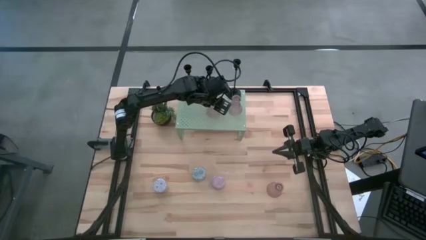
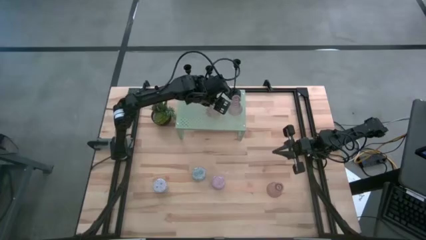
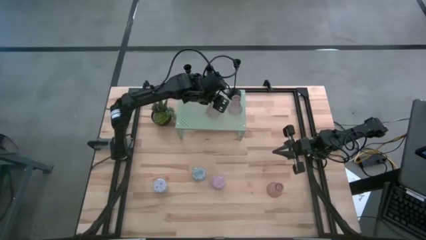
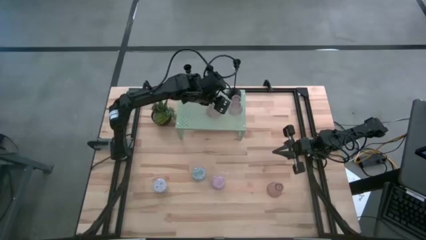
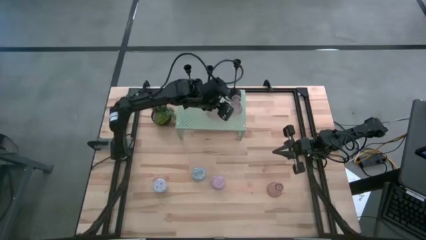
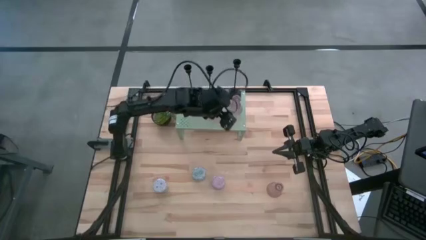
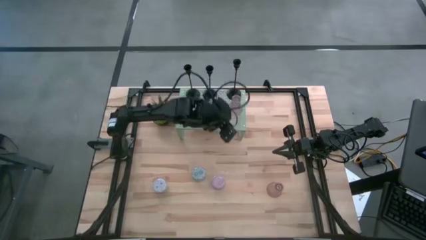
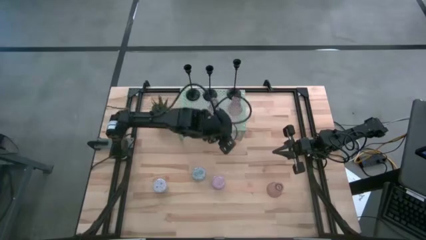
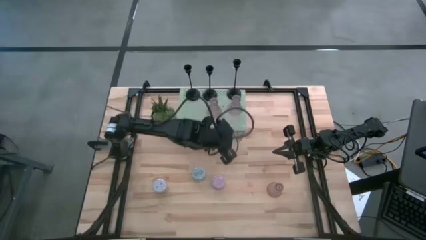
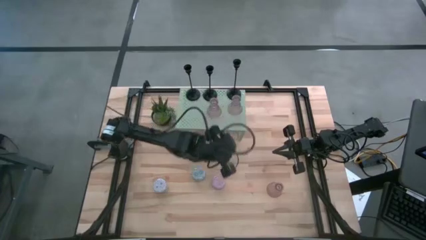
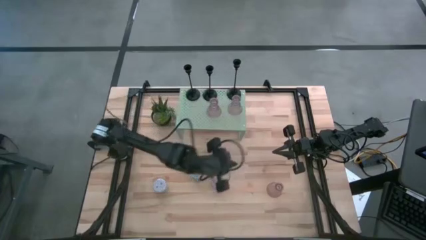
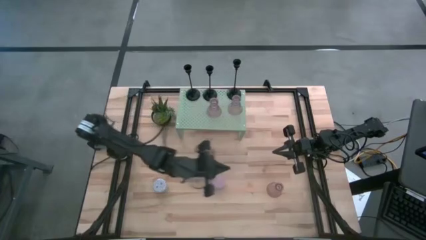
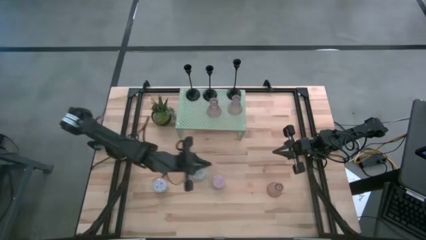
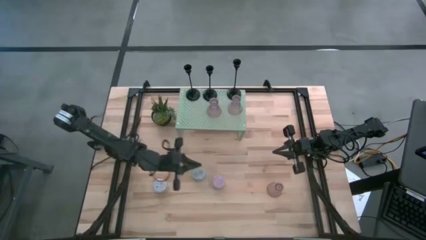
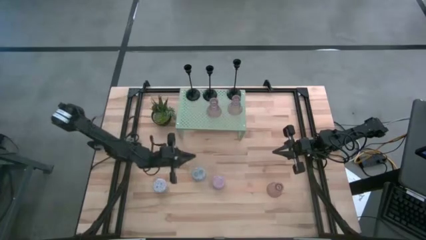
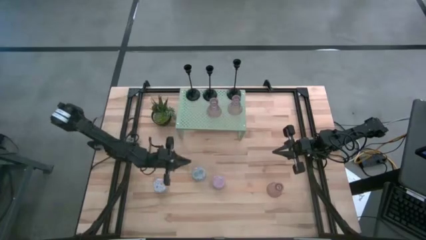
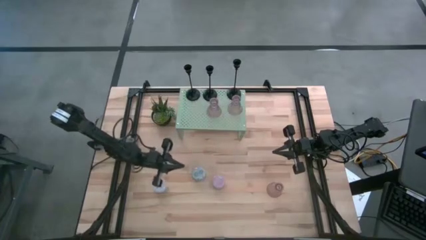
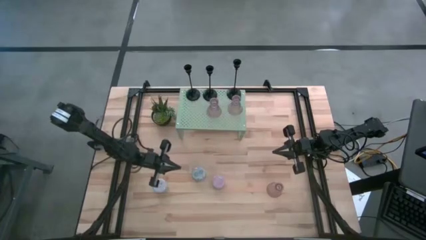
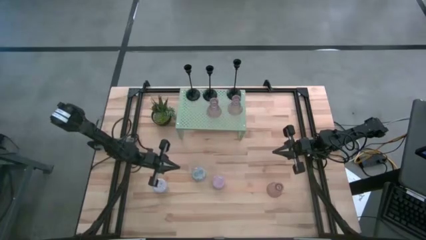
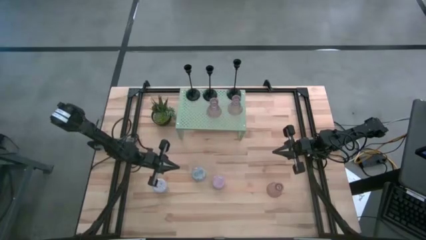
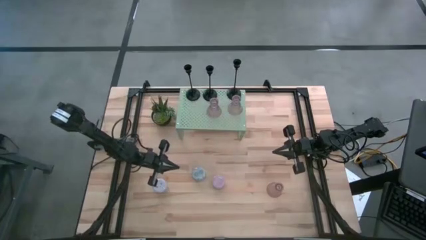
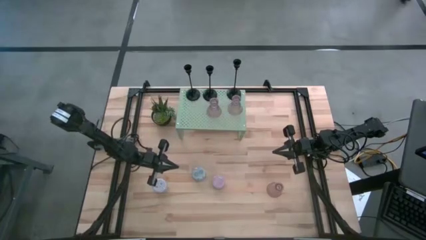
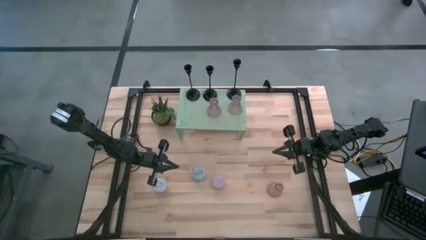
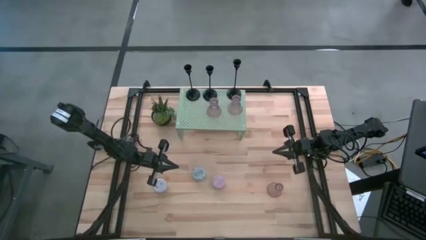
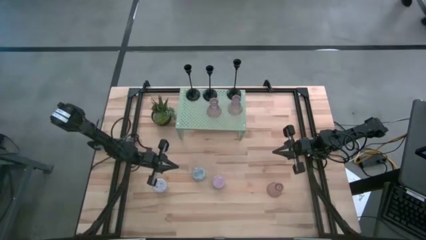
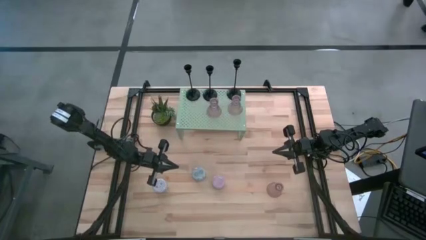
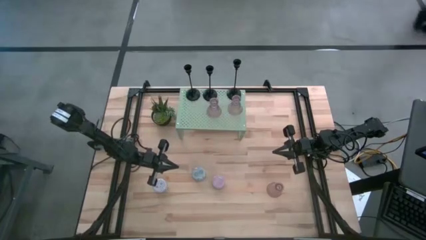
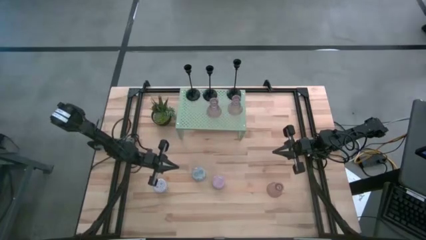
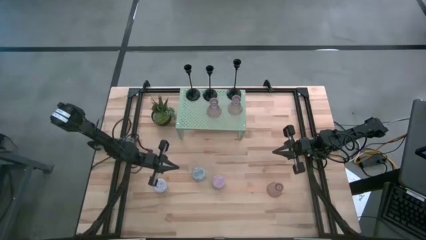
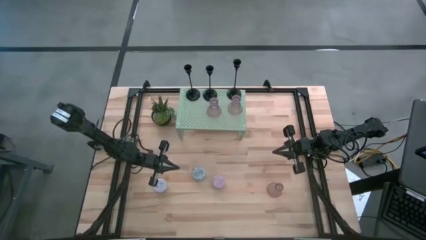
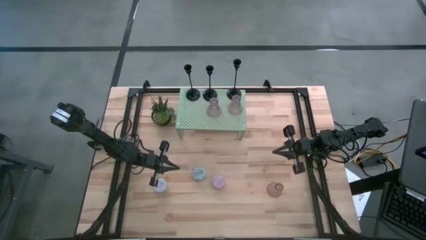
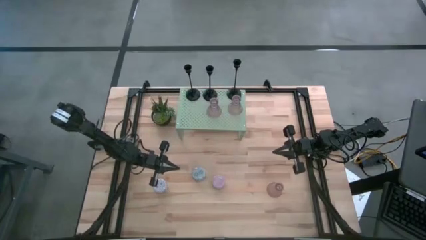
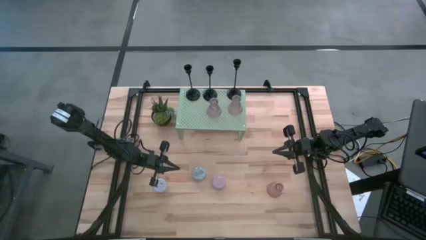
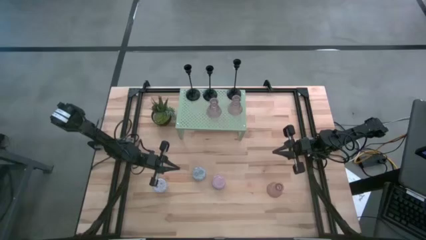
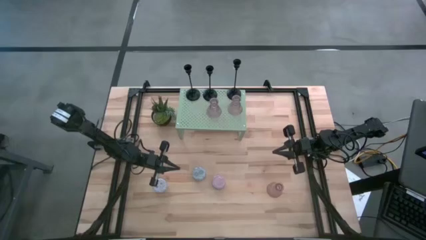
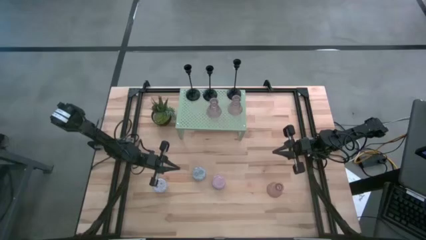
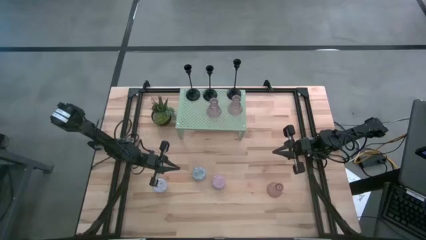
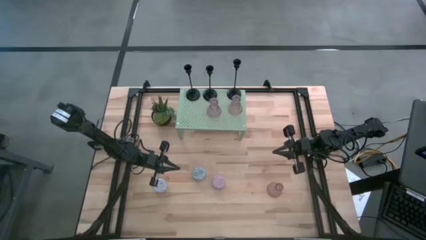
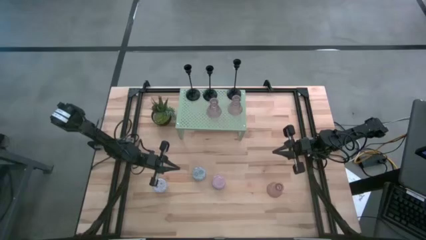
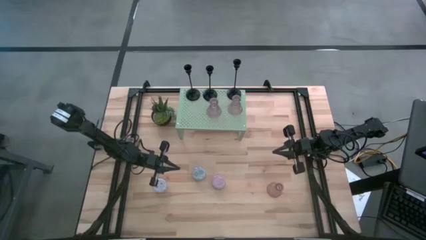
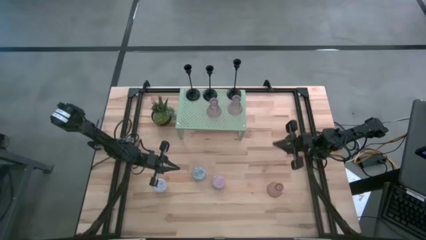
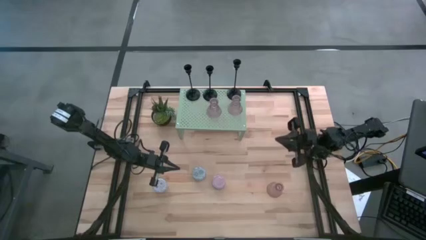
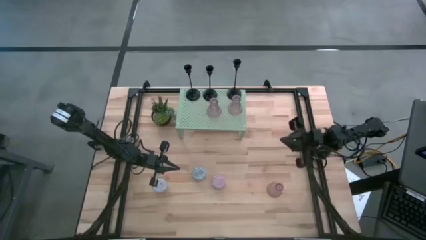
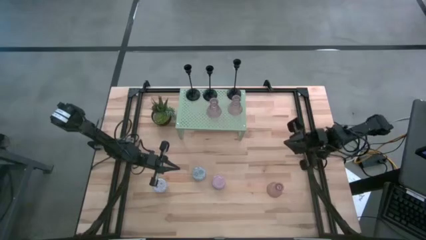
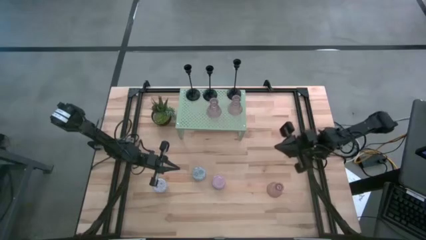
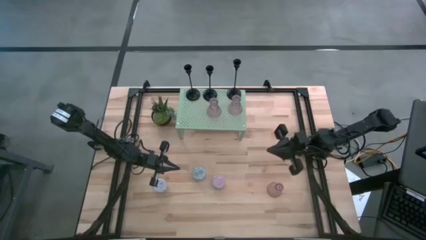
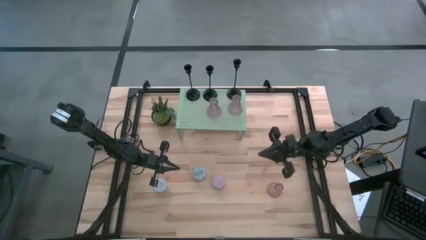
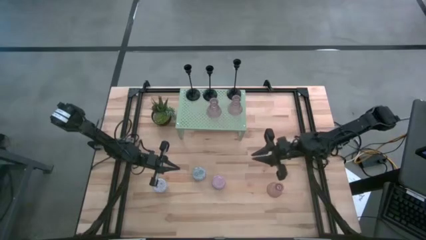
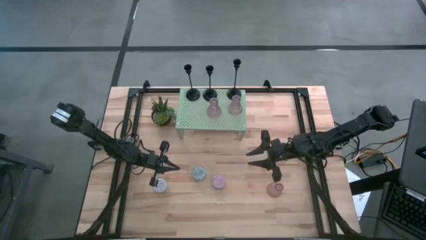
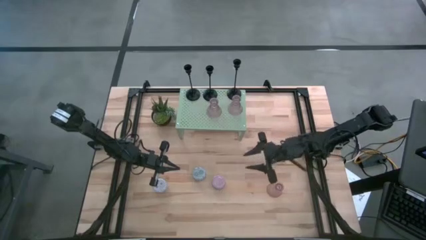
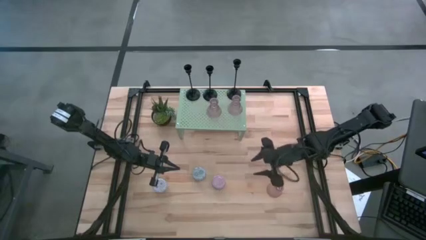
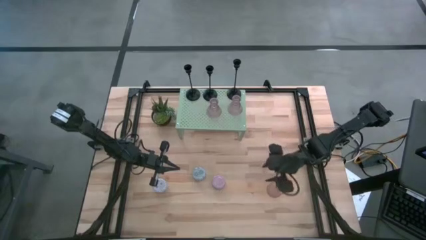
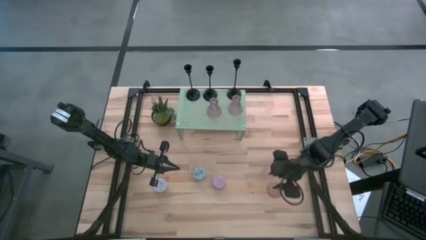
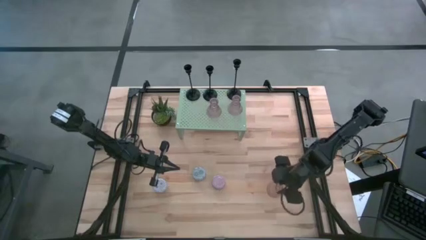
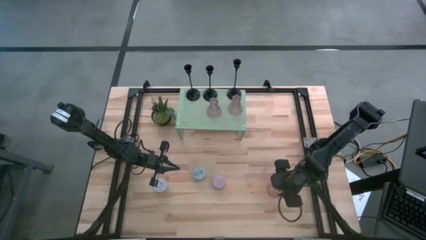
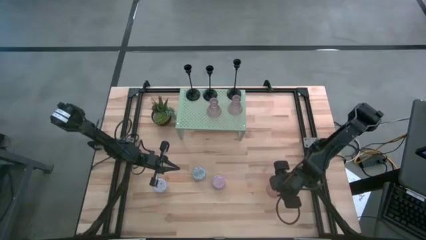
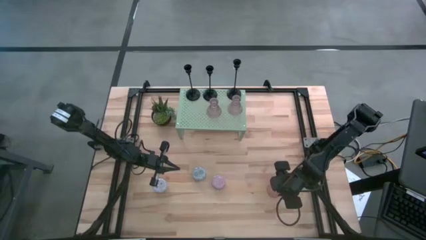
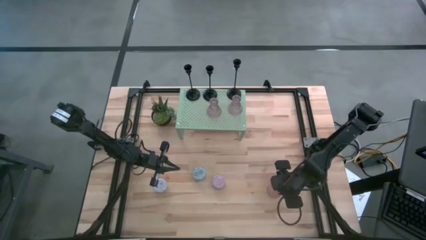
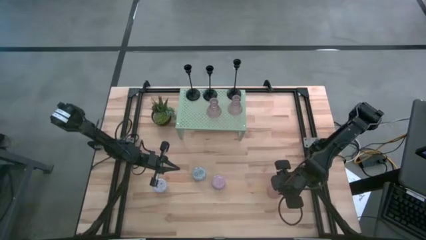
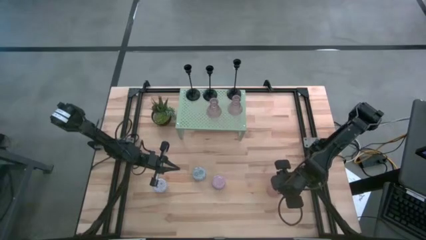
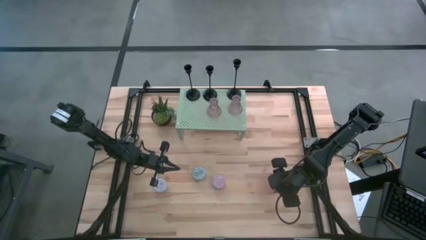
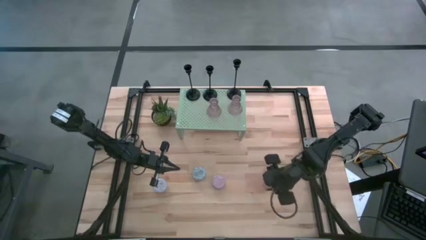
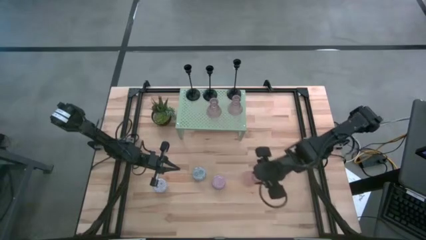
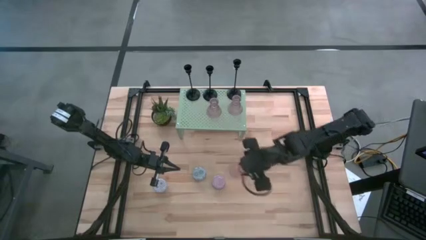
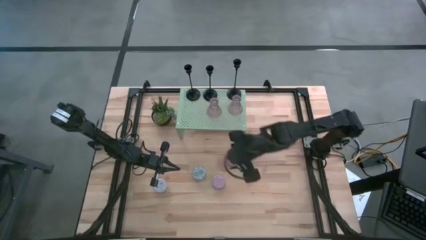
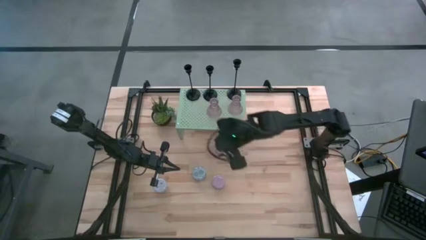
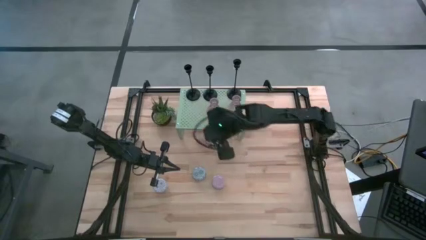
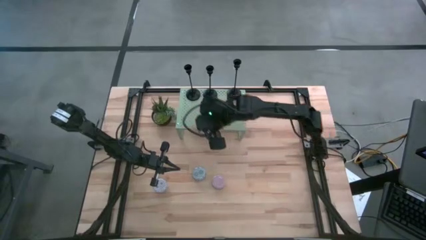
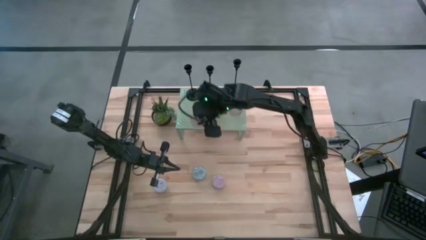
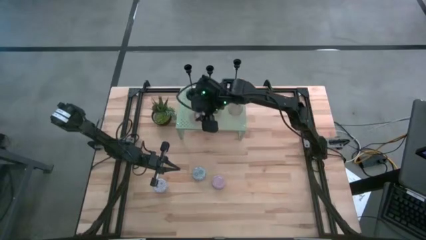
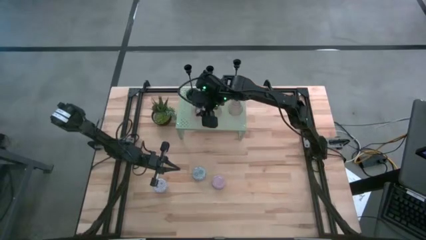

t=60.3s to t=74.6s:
Task: Pick & Place candle stick holders
Put the transparent pink candle holder on the shelf aligned with the black candle holder

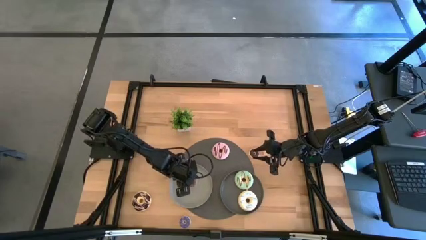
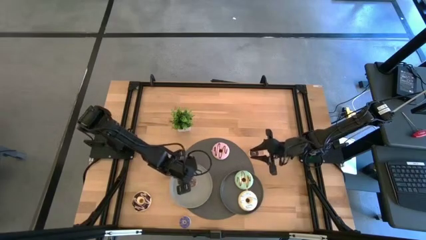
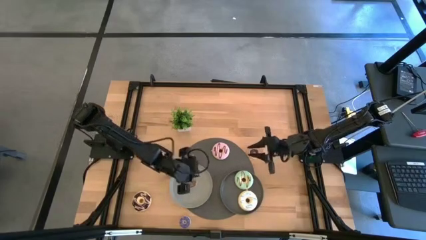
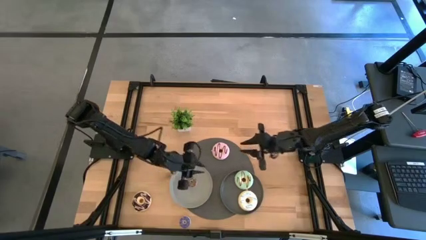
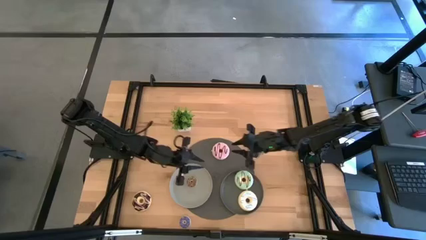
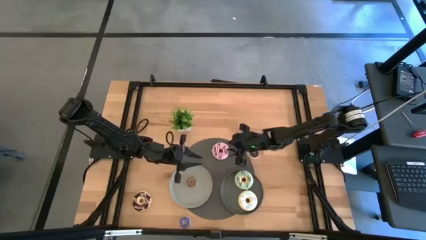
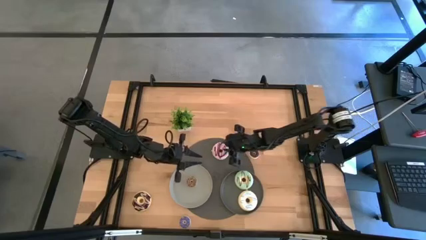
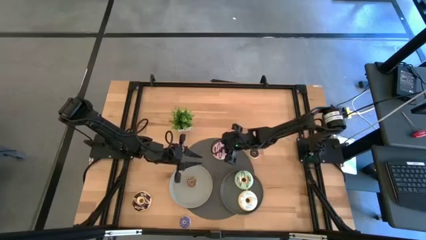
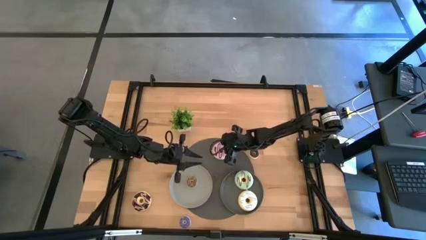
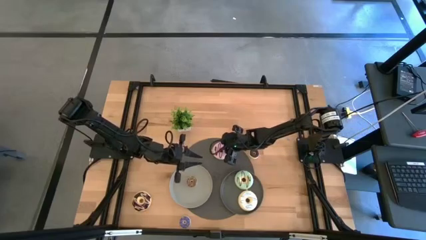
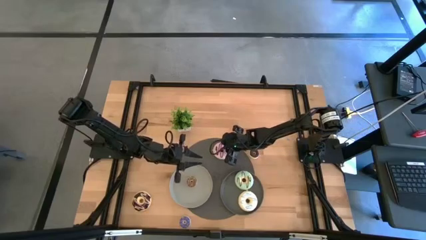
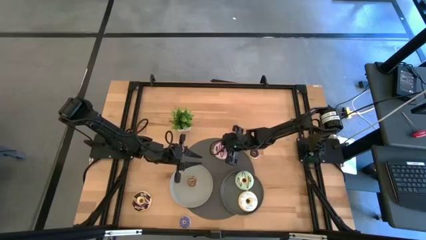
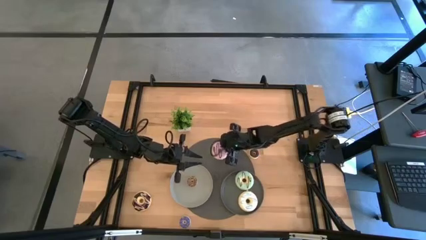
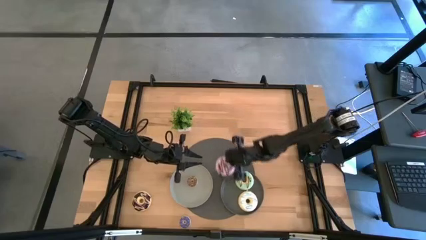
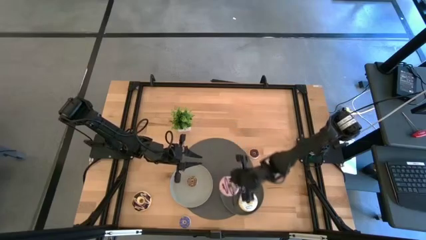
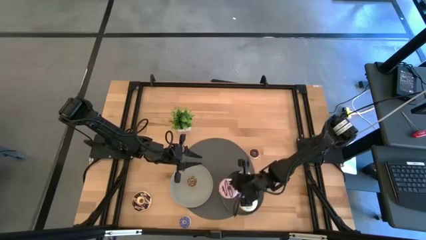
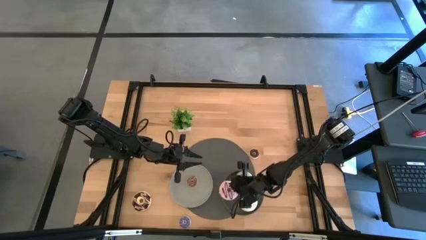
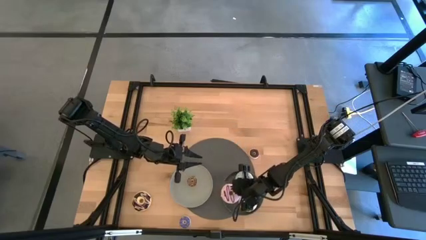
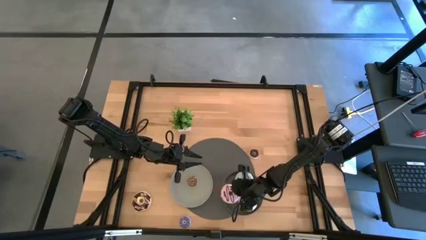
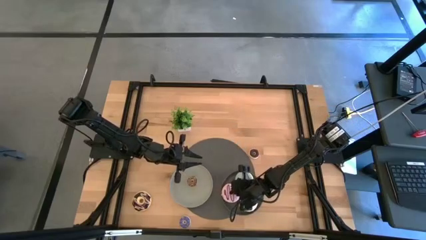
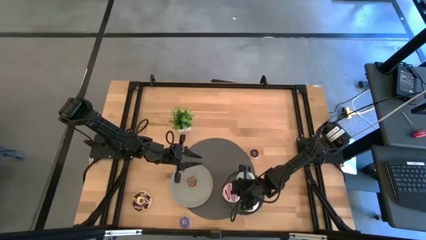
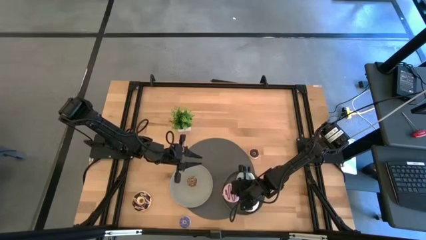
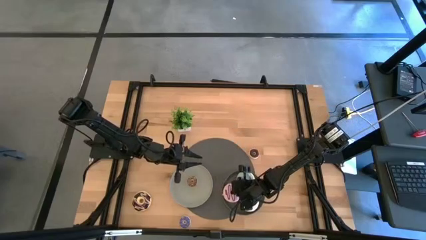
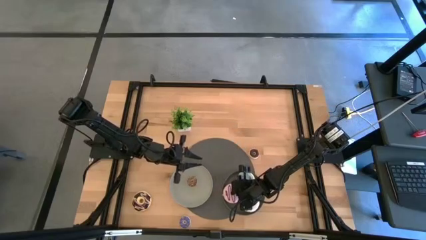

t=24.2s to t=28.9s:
Task: Pick & Place donuts
Put the large pink donut on the dark grey plate
